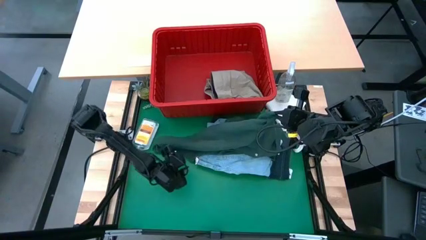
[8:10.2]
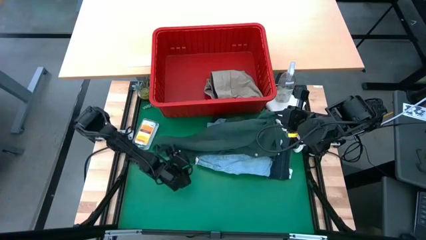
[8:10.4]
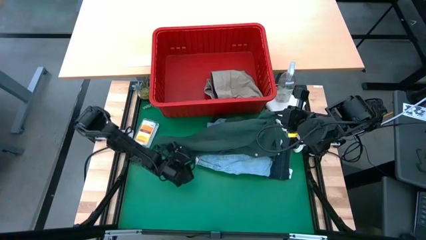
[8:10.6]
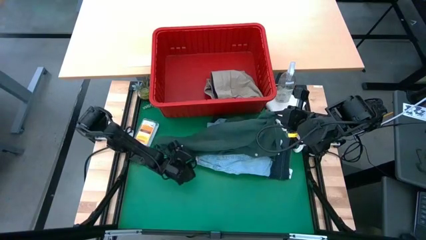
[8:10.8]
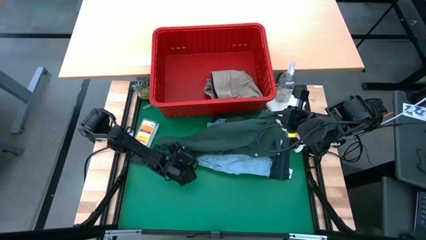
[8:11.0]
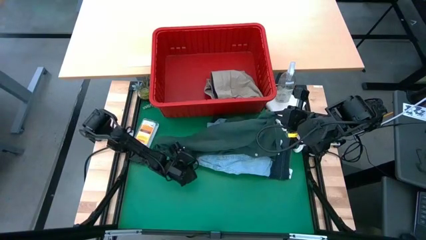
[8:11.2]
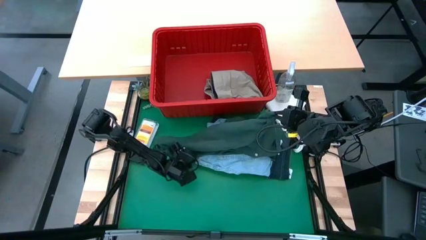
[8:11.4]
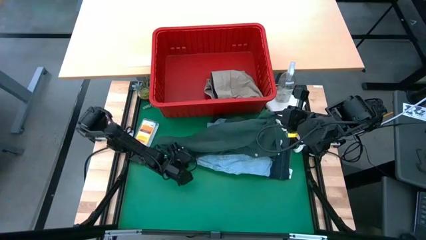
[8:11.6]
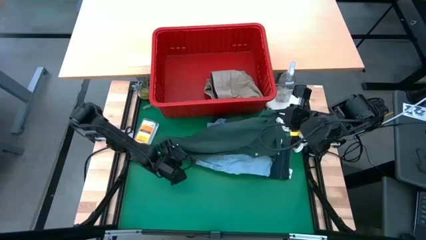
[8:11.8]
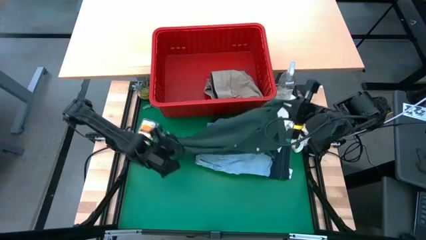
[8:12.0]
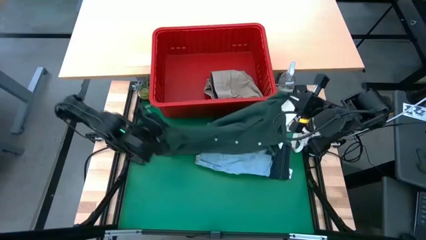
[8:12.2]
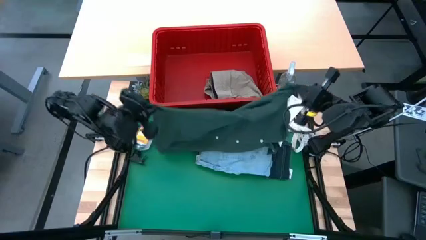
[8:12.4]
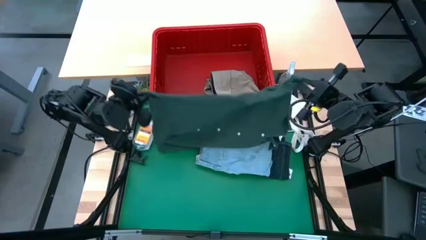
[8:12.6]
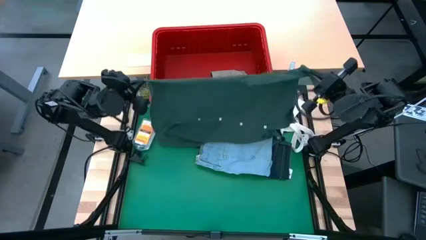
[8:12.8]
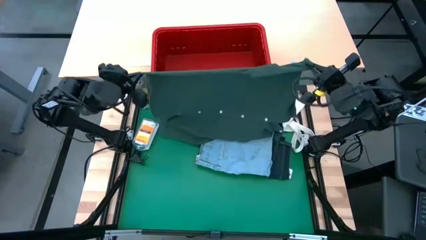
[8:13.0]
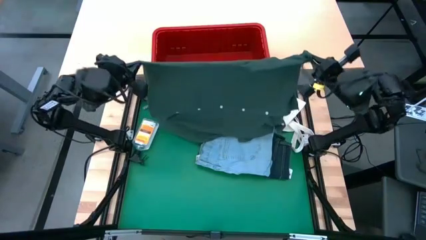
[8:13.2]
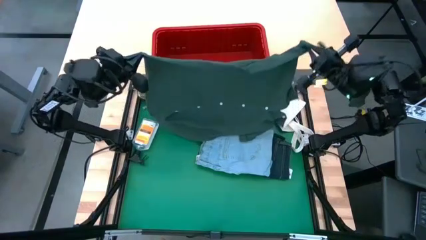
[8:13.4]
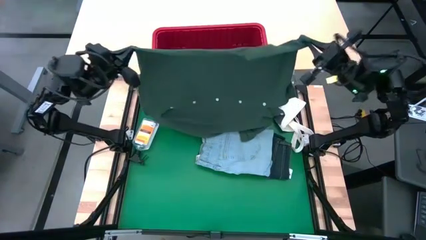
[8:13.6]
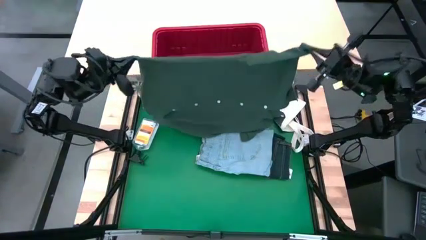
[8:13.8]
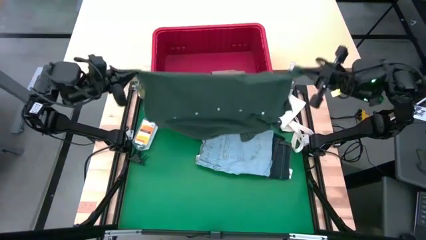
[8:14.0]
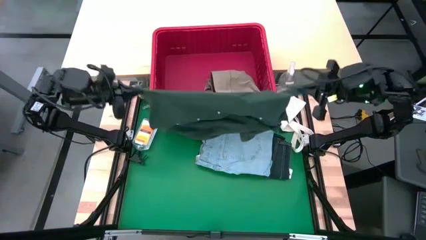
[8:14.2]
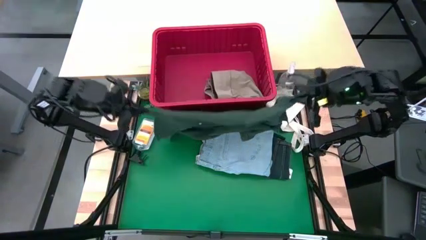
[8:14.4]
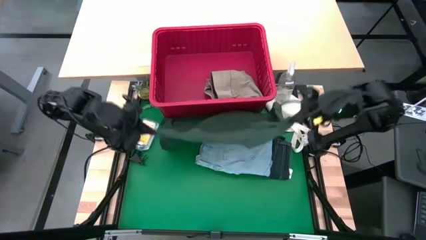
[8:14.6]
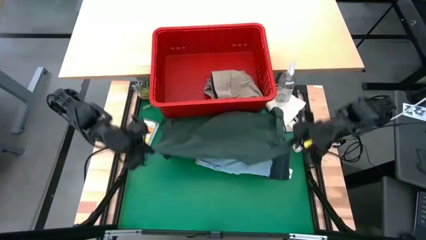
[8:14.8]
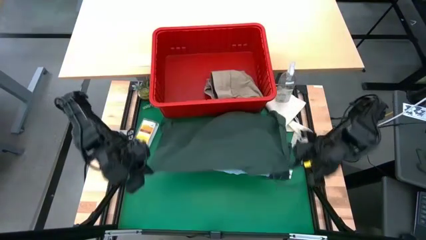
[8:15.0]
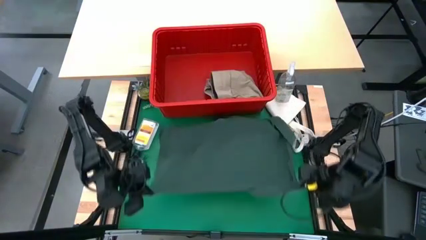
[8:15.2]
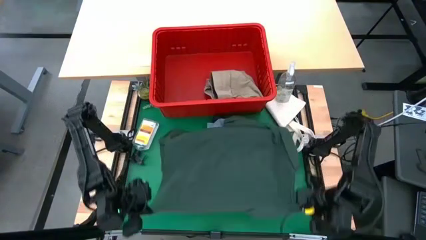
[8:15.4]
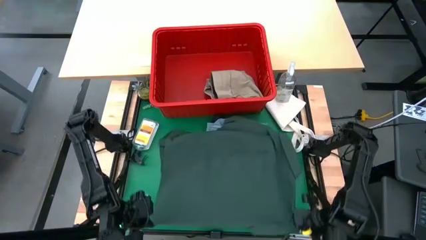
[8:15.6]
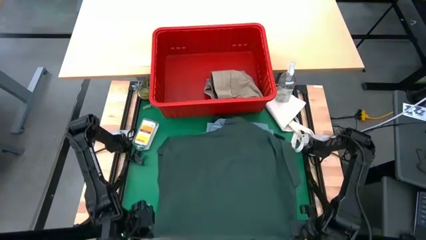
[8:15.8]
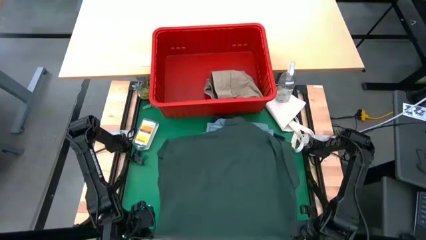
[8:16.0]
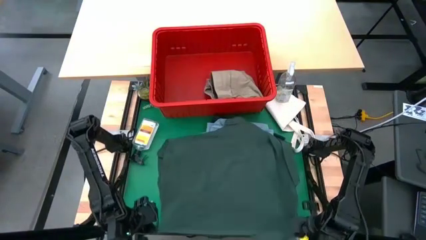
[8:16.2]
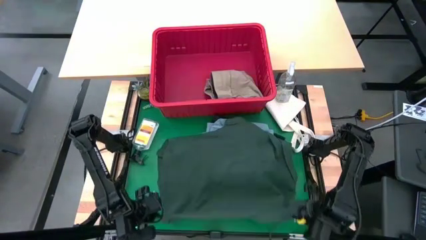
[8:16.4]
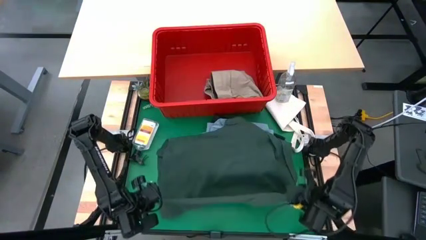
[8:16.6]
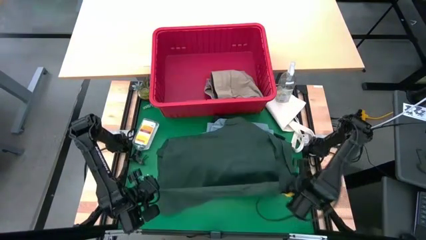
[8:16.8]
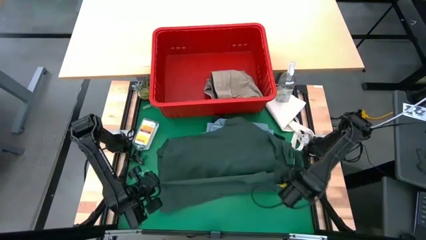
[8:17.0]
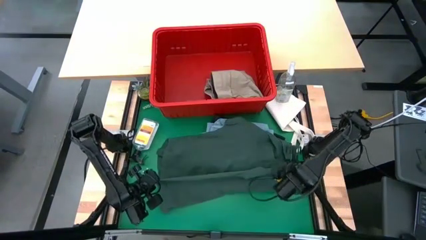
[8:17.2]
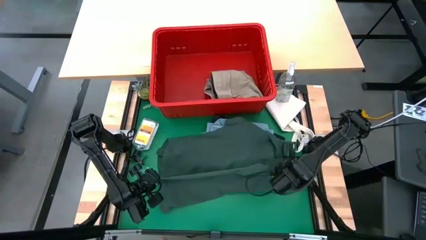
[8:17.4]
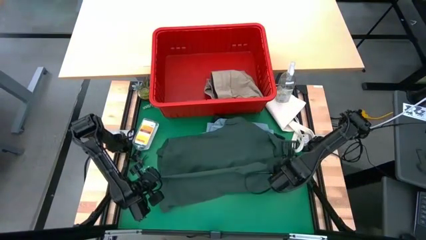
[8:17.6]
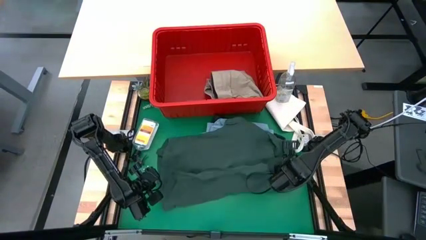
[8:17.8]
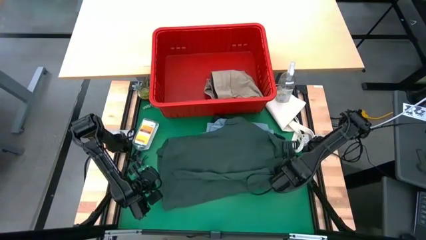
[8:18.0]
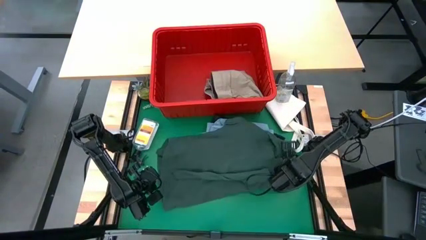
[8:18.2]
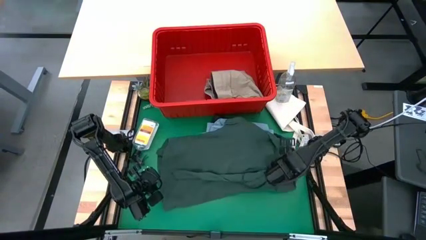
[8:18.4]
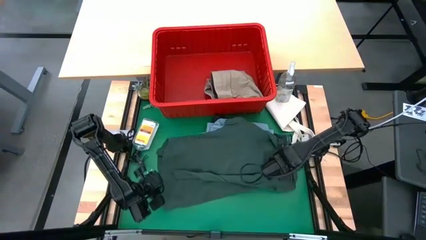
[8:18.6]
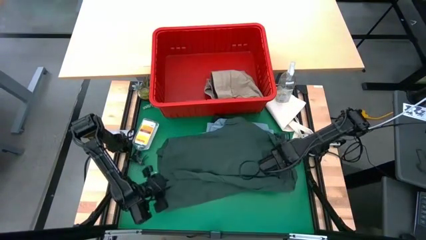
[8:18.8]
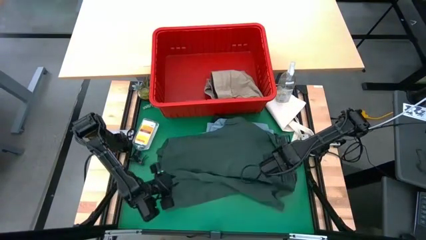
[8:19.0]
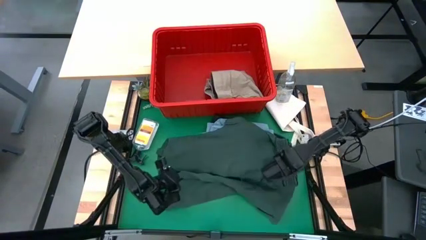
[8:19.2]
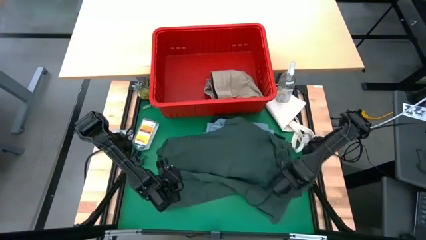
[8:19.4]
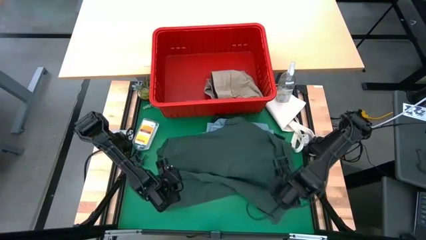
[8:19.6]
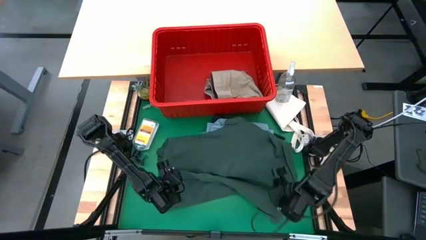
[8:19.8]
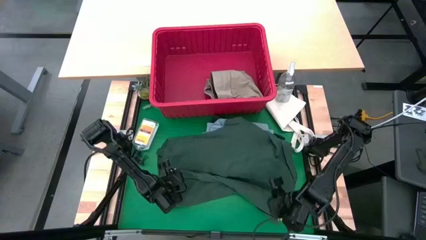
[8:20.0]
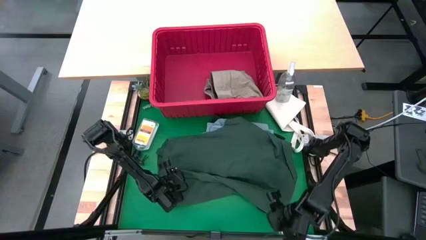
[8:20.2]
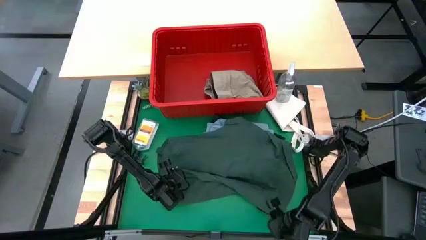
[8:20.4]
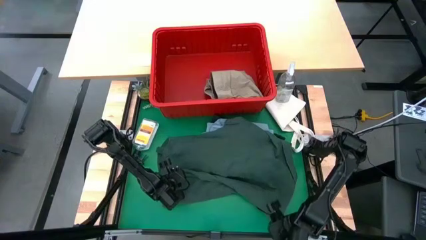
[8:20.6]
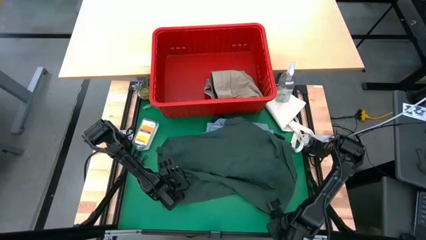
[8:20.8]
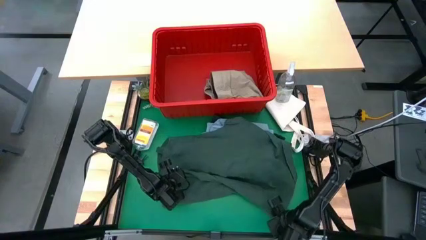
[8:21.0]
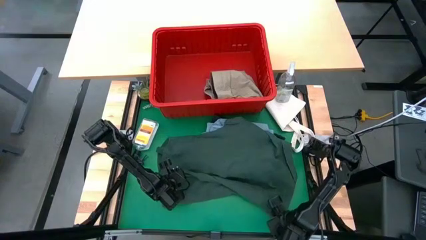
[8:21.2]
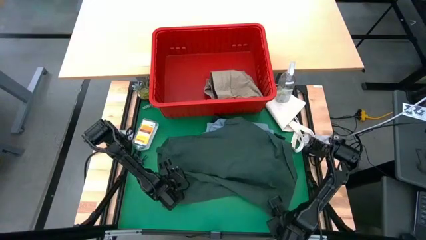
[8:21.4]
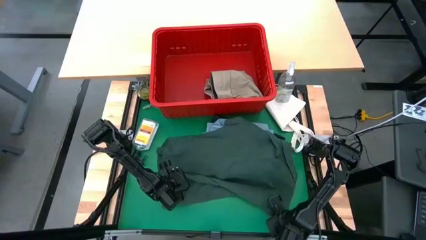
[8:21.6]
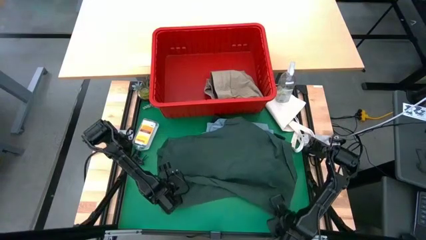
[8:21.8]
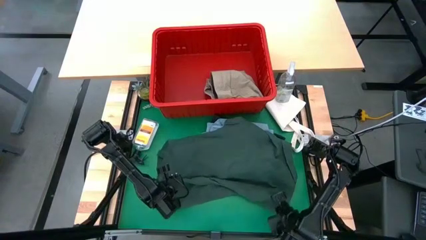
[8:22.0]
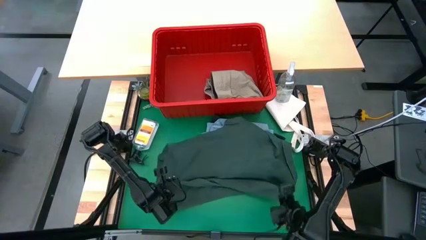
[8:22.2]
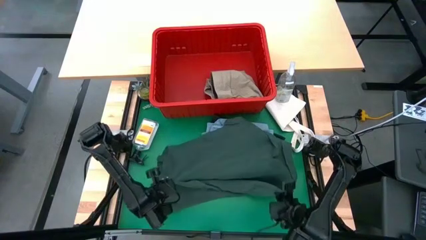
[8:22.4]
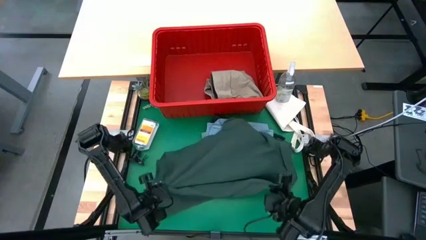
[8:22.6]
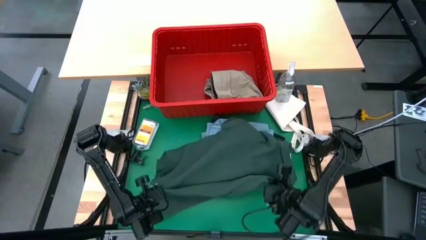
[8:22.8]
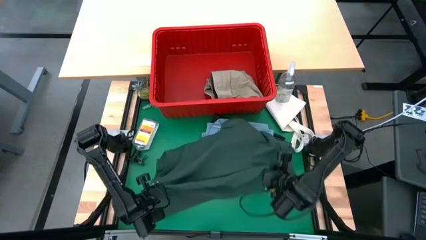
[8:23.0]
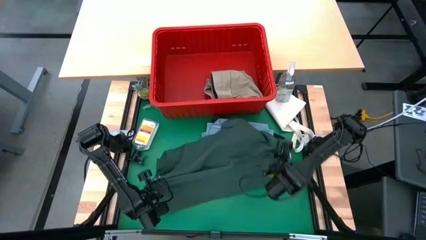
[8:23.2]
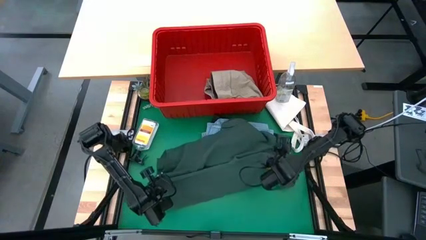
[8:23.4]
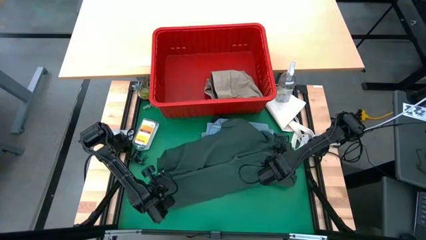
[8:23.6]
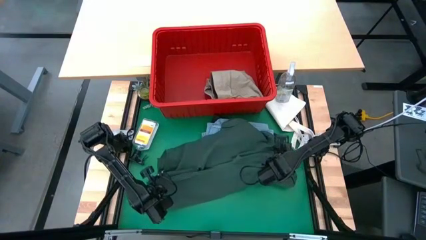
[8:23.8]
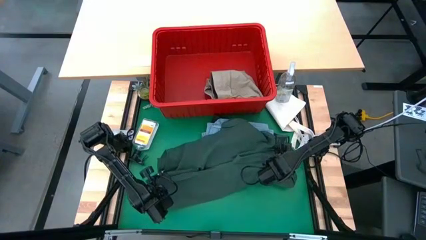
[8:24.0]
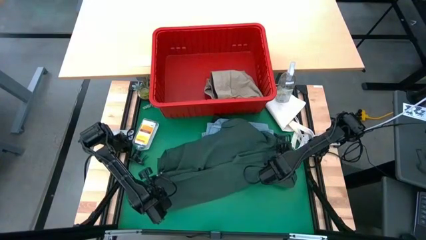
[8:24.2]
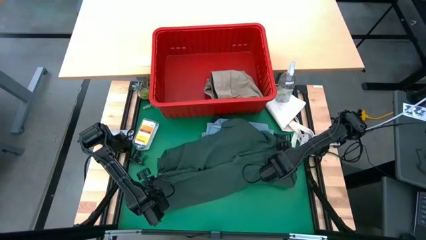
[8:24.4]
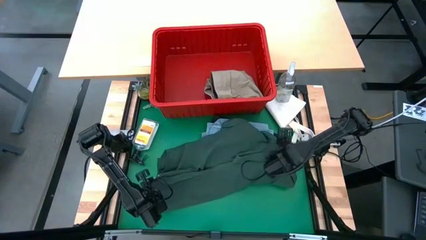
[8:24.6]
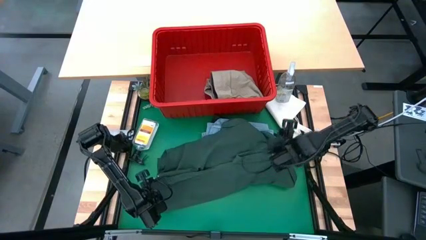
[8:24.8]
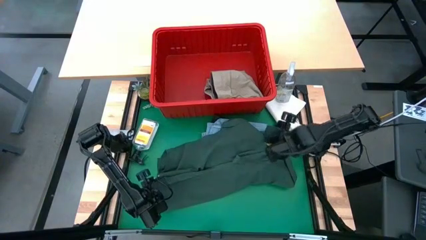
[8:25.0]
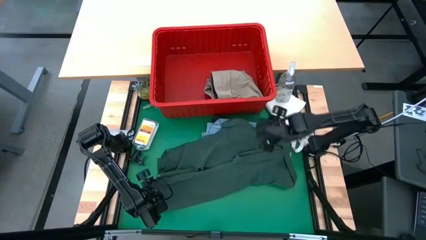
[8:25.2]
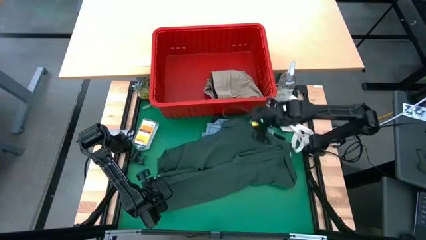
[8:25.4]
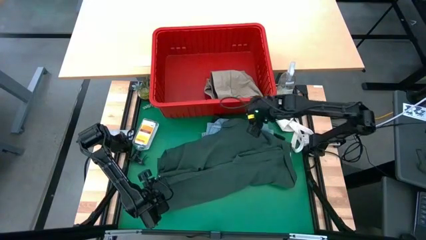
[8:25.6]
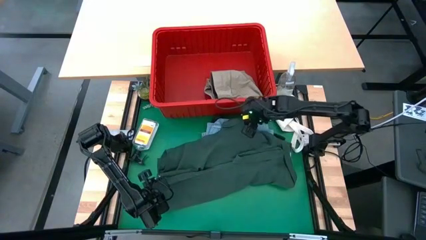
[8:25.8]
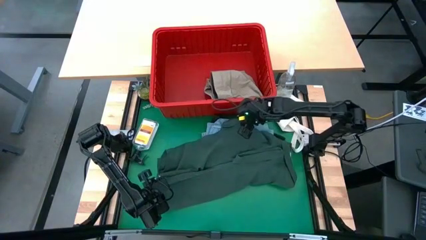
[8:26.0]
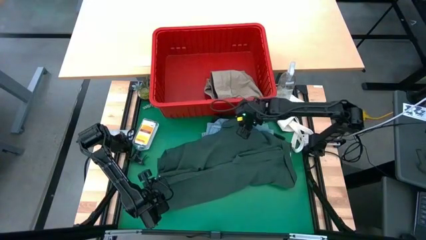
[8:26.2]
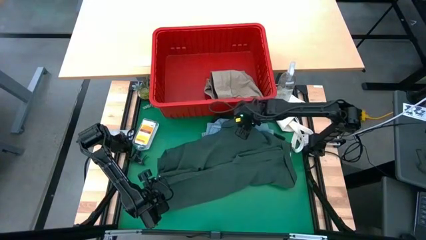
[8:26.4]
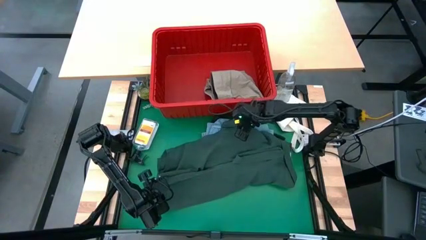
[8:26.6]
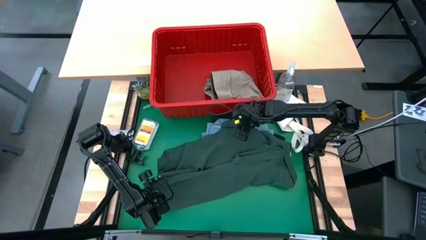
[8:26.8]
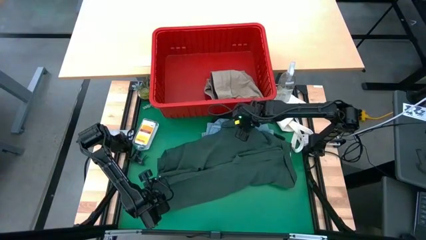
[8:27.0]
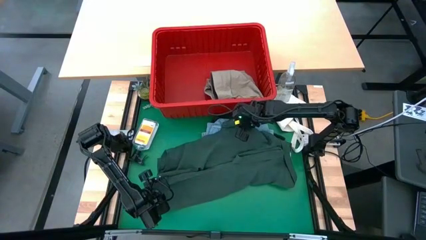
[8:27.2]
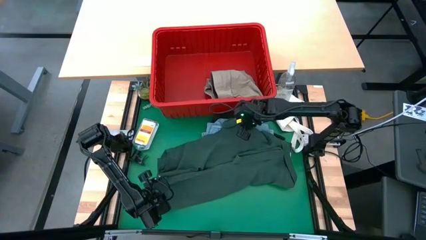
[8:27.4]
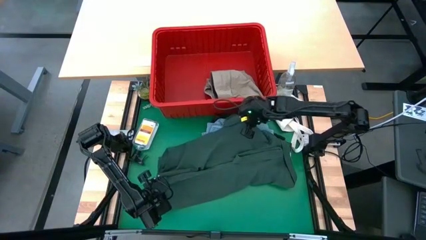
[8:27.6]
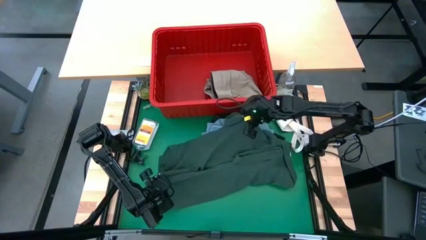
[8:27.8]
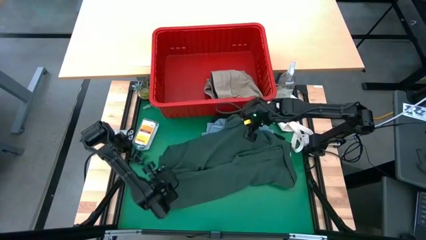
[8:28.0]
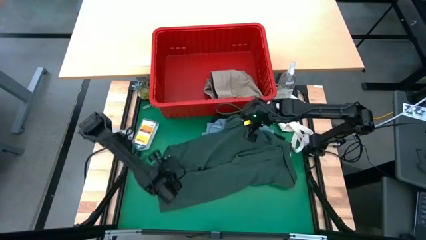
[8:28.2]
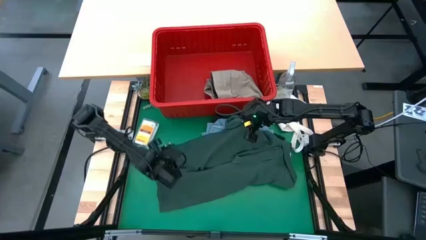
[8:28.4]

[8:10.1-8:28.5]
Task: Fold laundry
Fold the green shirt
